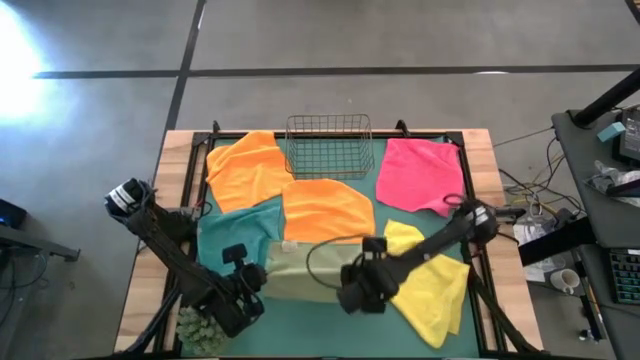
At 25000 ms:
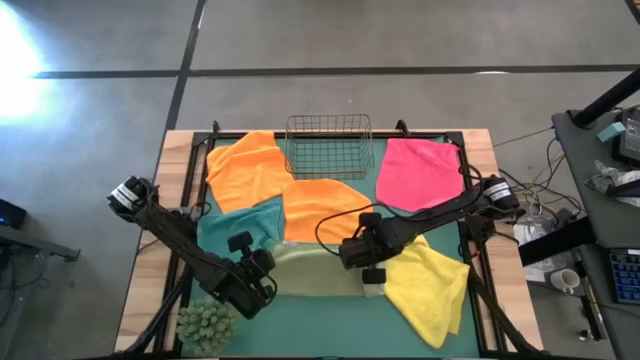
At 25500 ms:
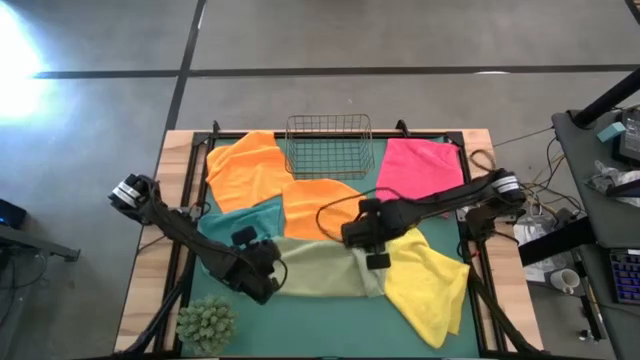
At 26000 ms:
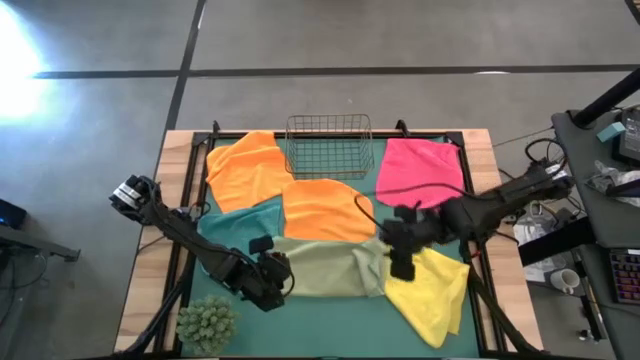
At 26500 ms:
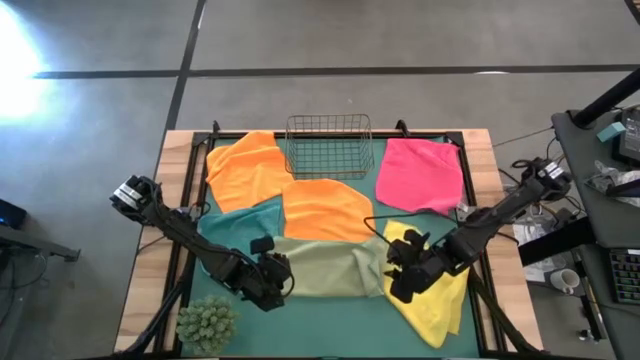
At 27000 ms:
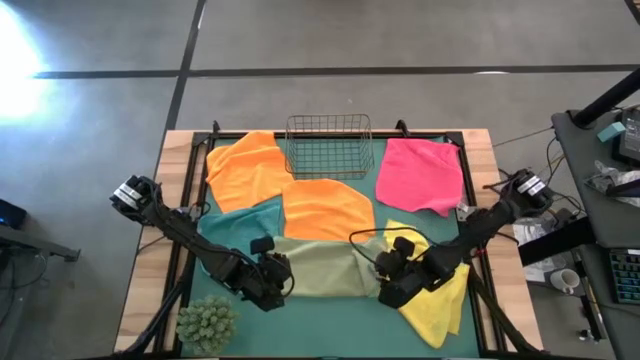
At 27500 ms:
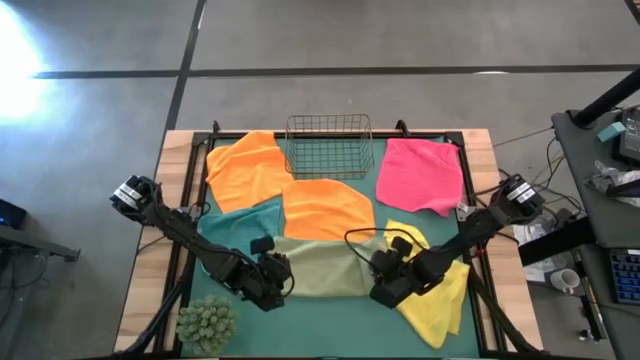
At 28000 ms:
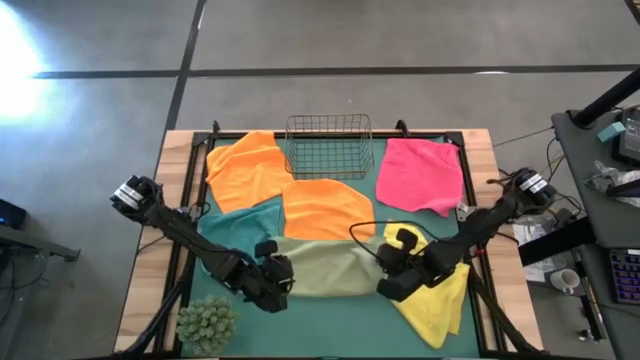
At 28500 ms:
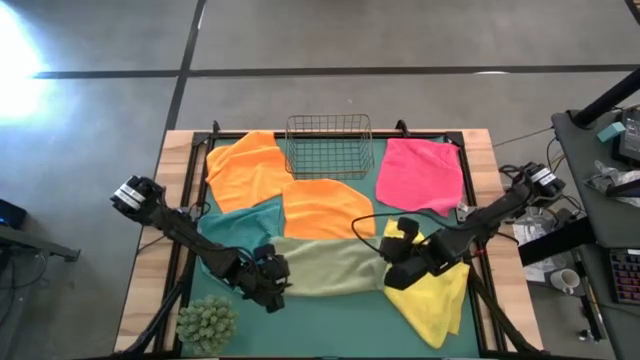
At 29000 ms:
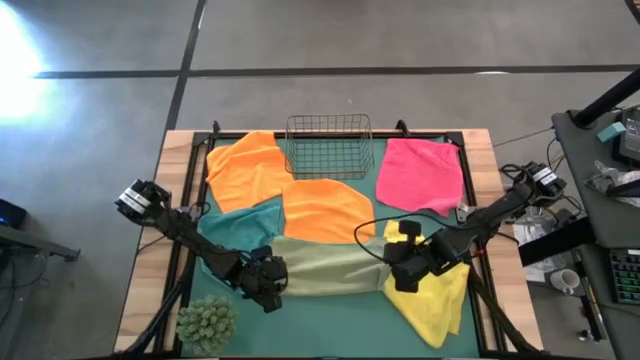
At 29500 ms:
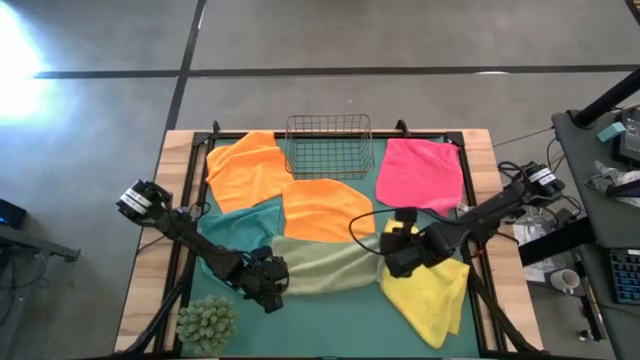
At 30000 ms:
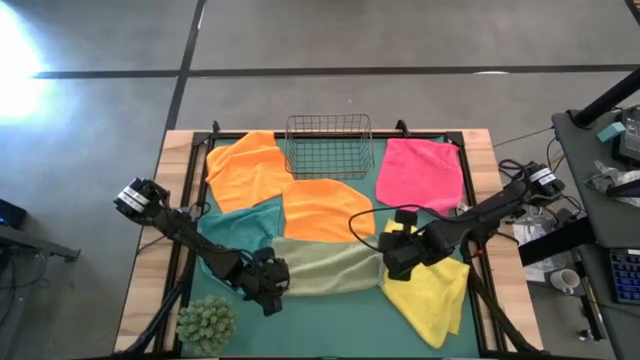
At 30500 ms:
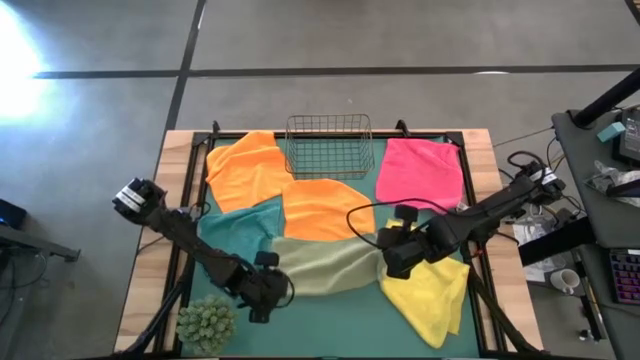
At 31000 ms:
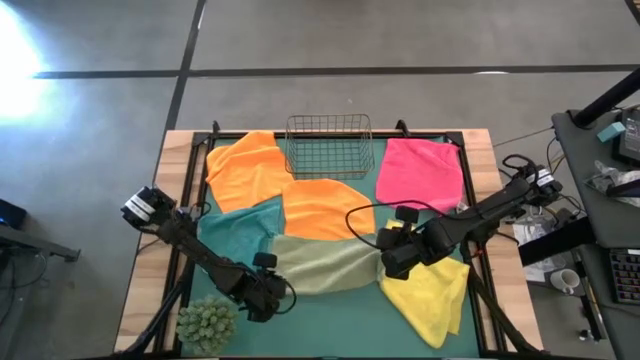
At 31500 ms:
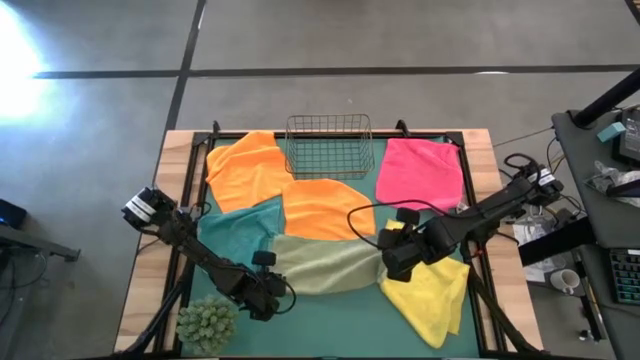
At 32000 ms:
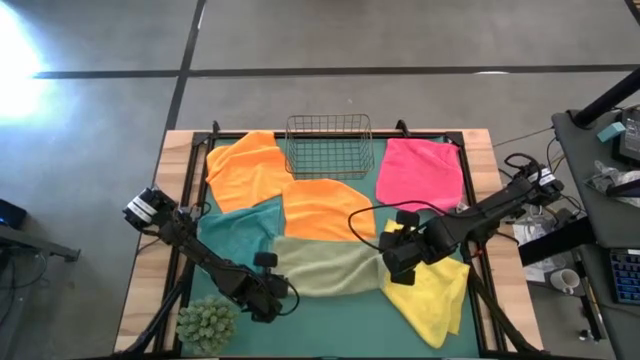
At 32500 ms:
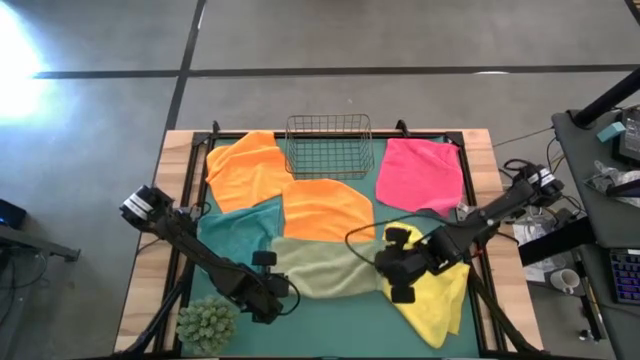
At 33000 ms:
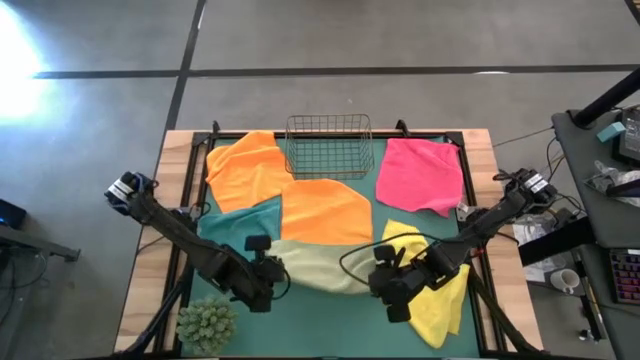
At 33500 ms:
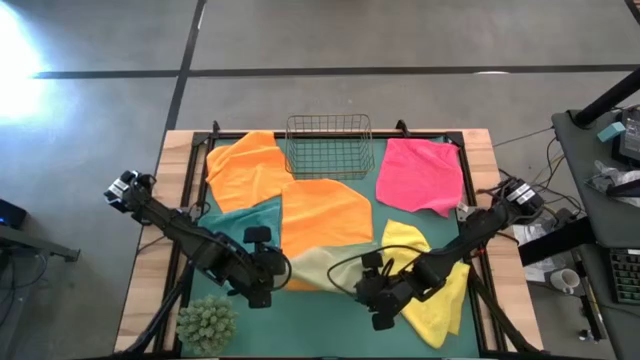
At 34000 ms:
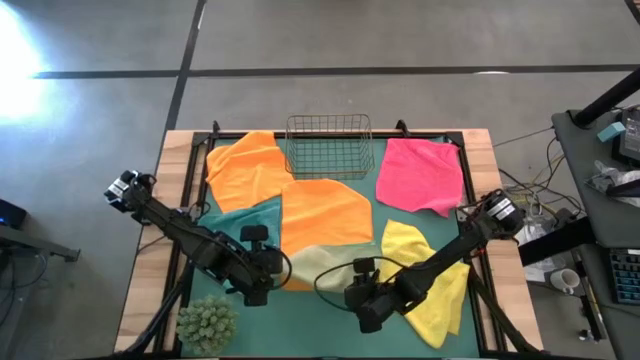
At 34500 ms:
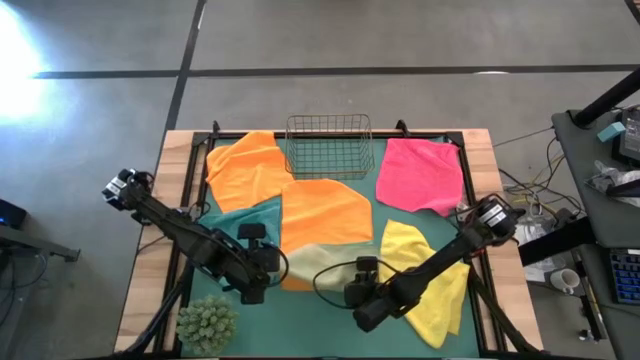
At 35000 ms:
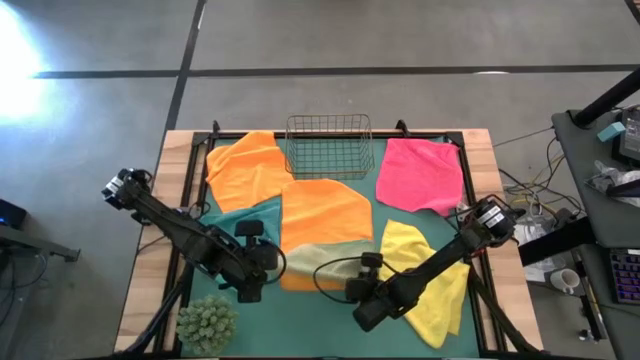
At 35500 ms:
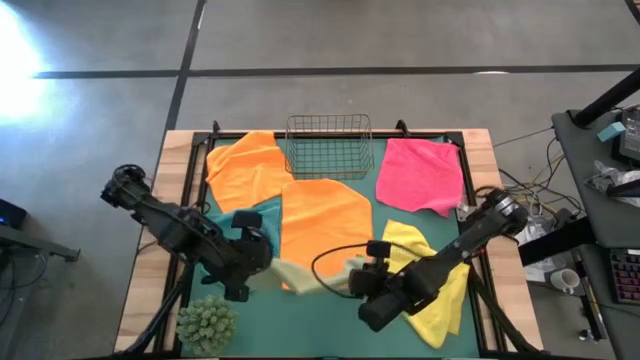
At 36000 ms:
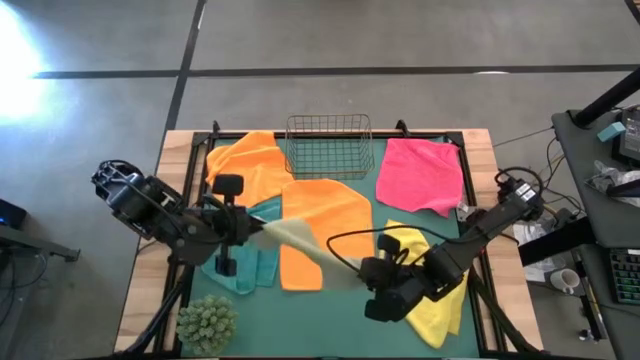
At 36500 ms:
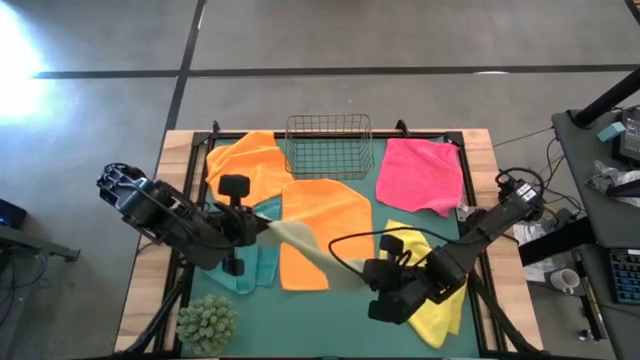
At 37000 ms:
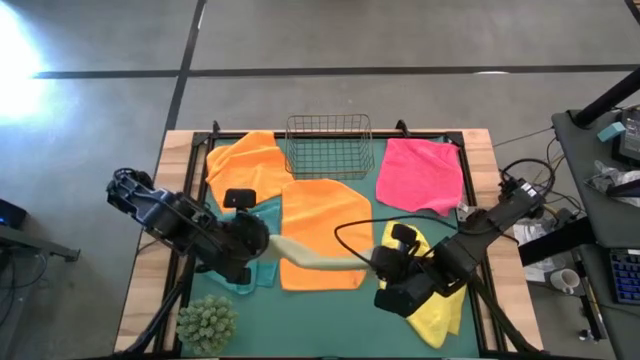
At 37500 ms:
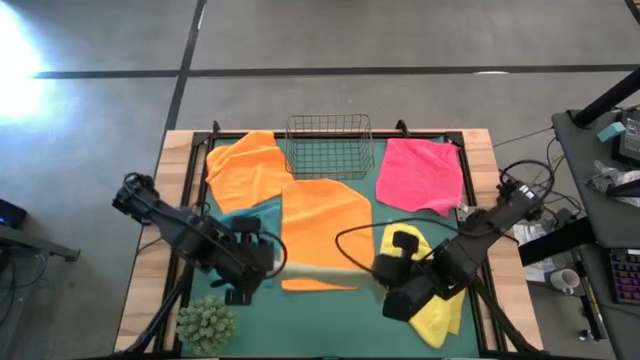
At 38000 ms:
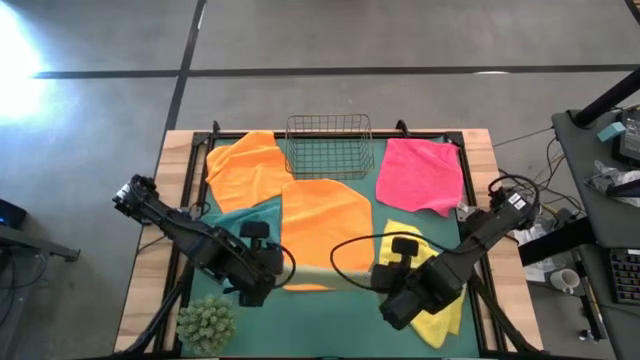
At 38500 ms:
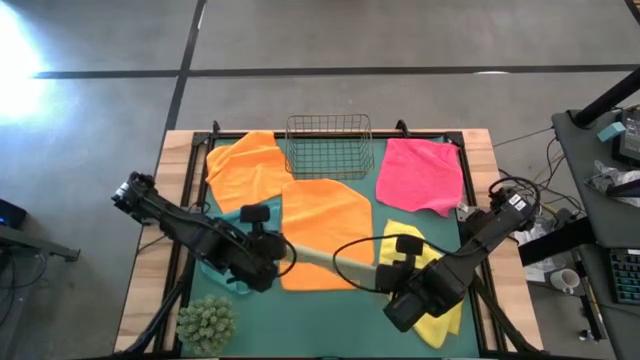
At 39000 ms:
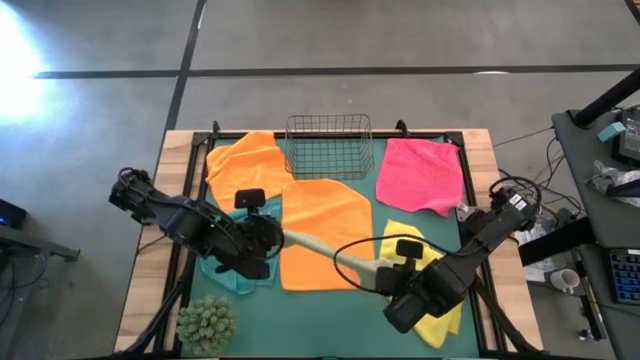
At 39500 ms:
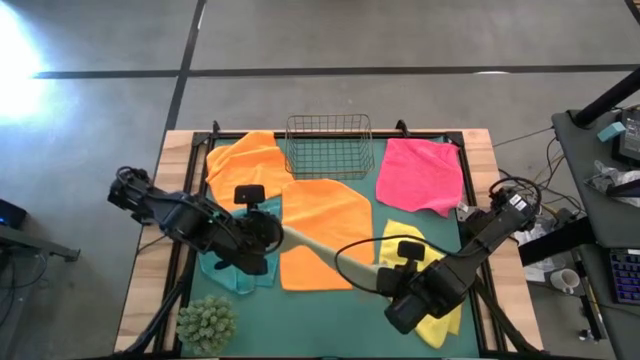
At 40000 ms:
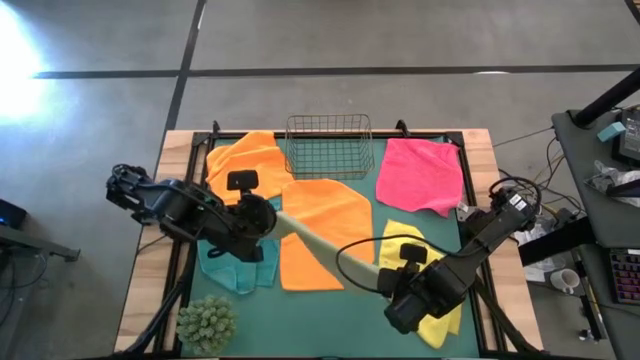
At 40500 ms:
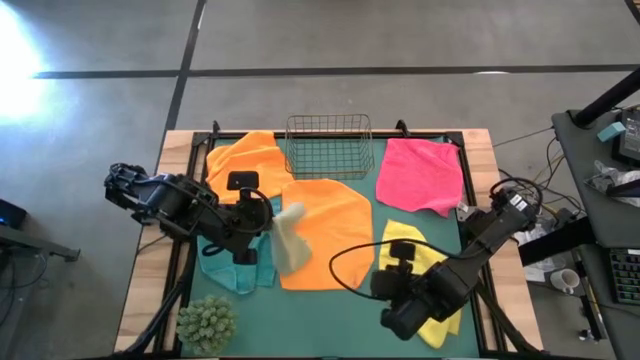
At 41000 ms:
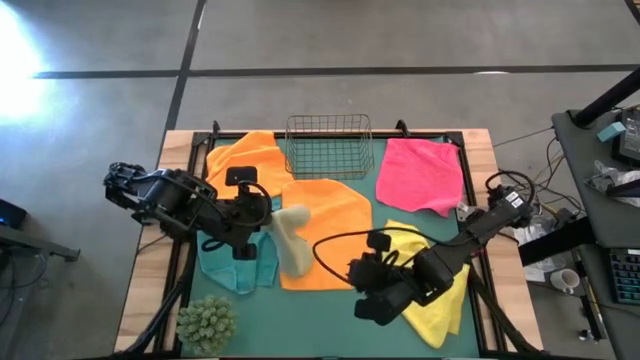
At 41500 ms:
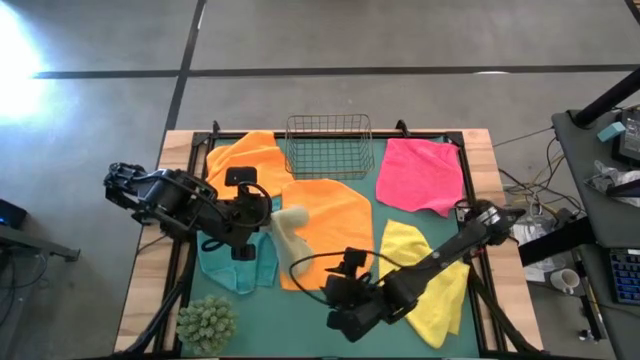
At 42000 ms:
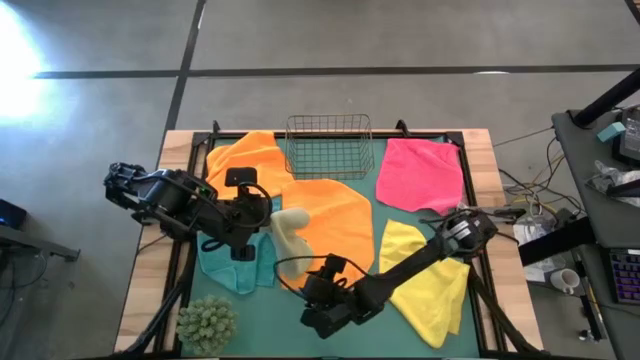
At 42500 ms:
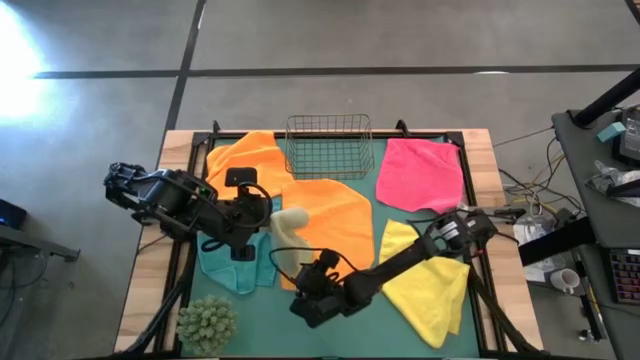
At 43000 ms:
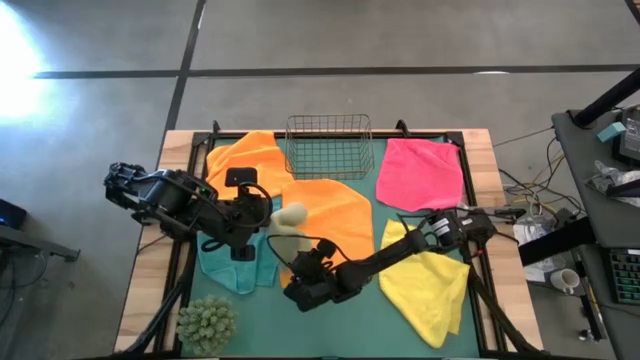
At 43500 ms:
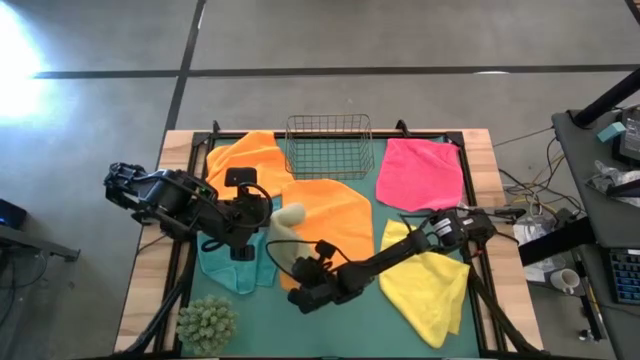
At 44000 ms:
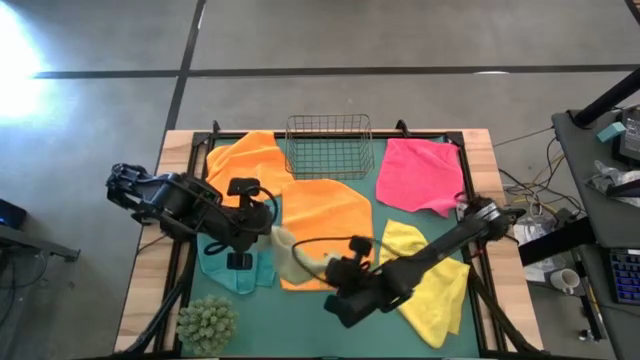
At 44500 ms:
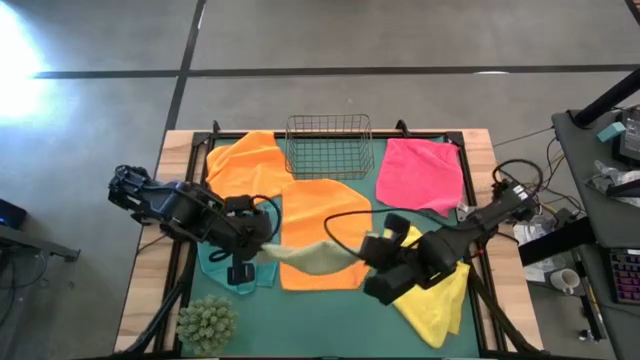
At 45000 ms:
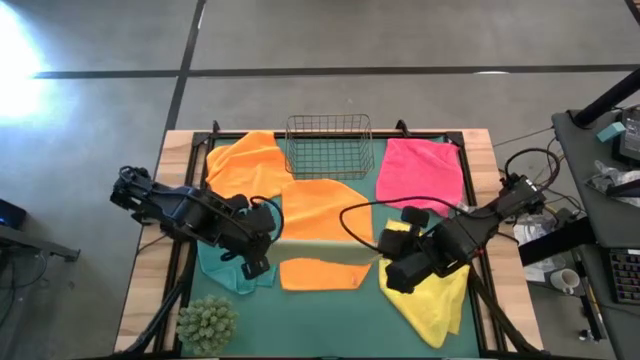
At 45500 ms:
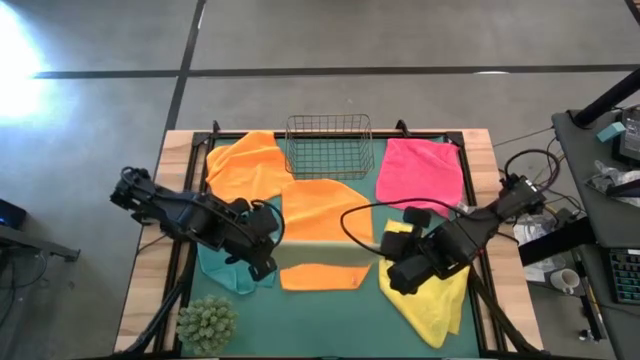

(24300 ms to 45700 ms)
Task: Fold microfiber towels
Fold the light green microfiber cloth
